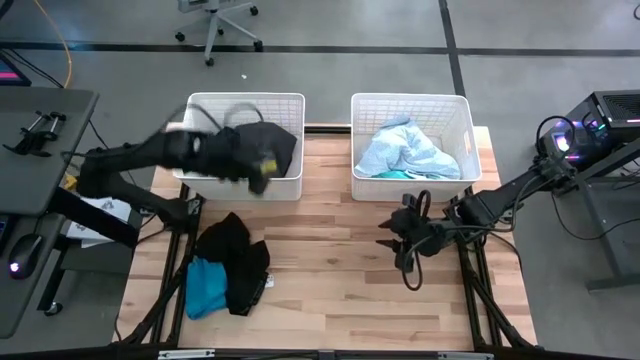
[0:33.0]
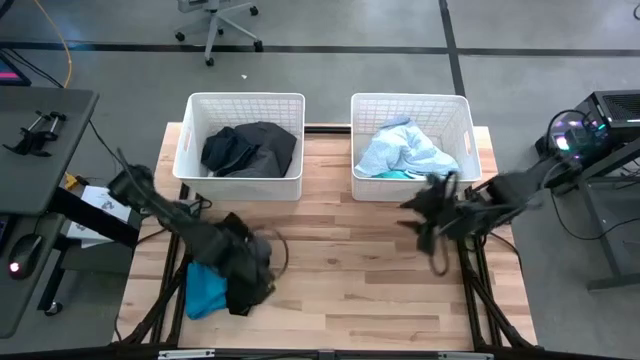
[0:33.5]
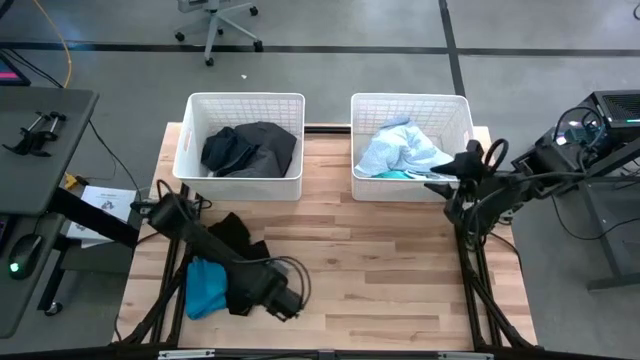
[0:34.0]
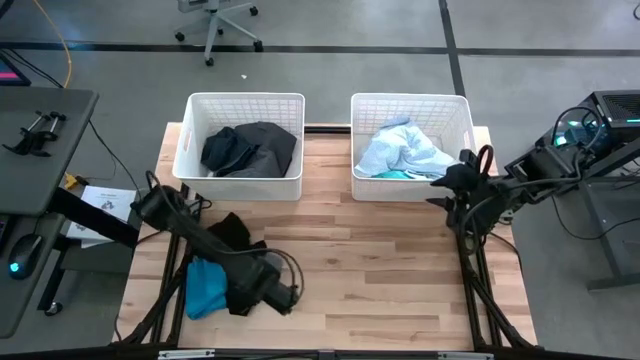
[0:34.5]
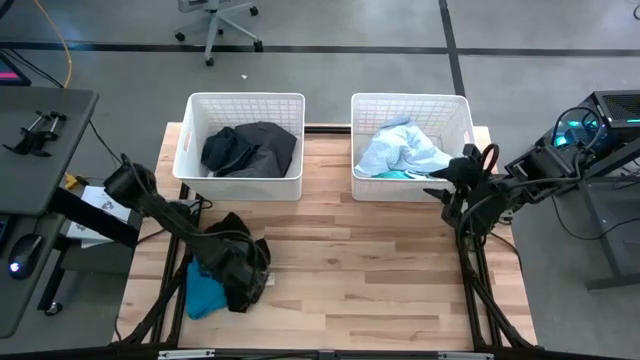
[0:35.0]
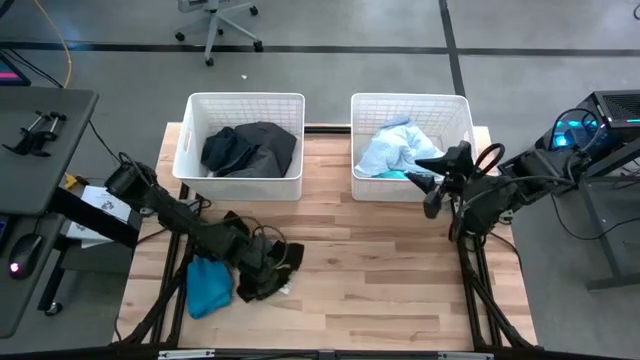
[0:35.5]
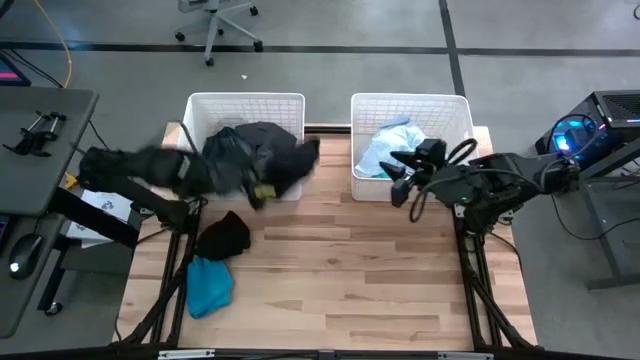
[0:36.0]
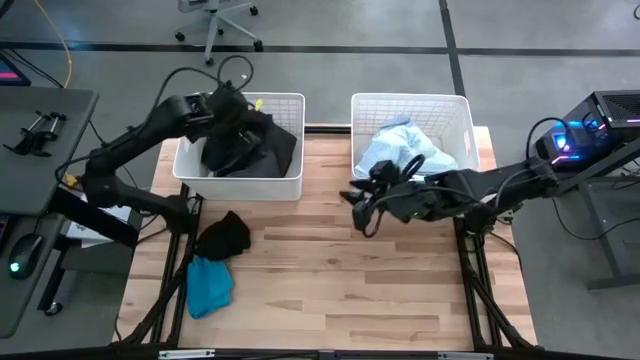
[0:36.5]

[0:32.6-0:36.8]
Task: Sort clothes
Put the bottom black boxer into the left white laundry bin

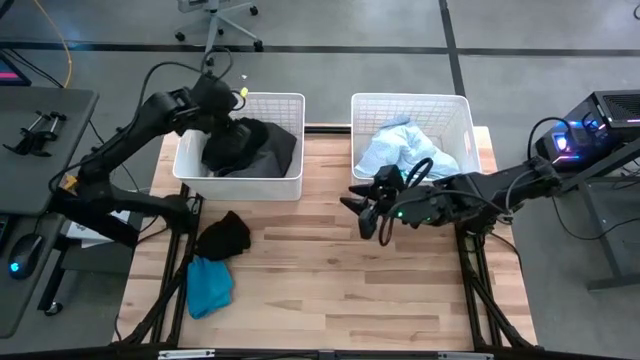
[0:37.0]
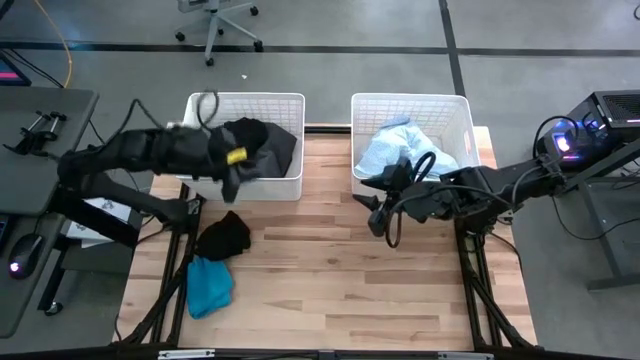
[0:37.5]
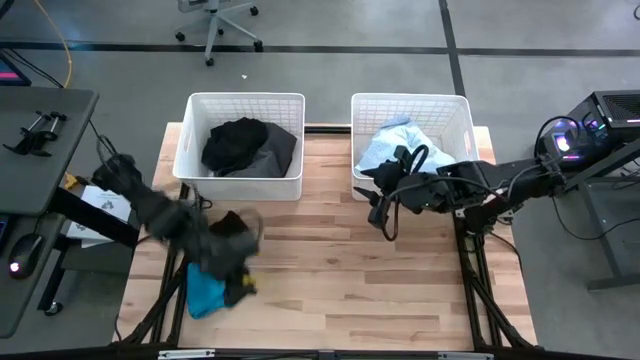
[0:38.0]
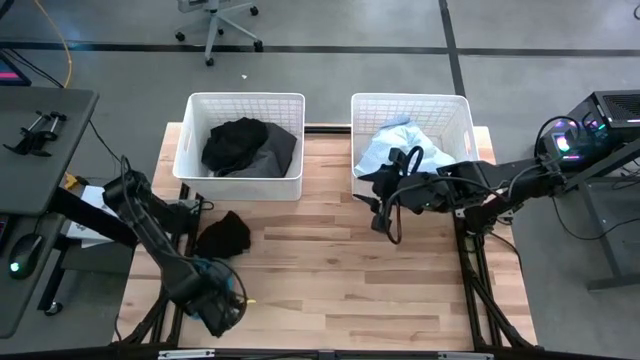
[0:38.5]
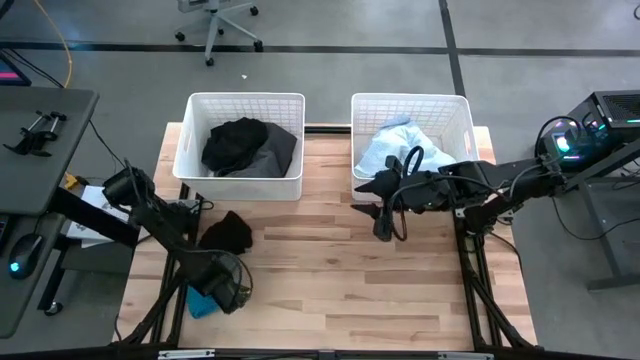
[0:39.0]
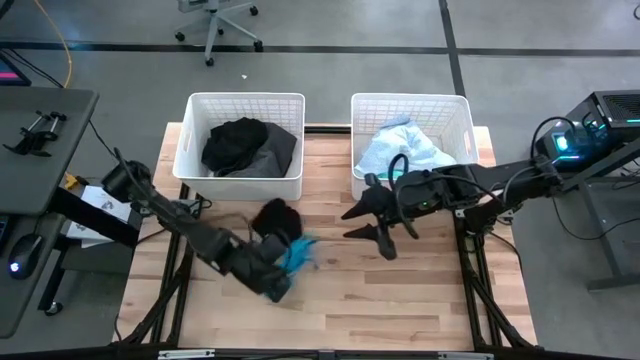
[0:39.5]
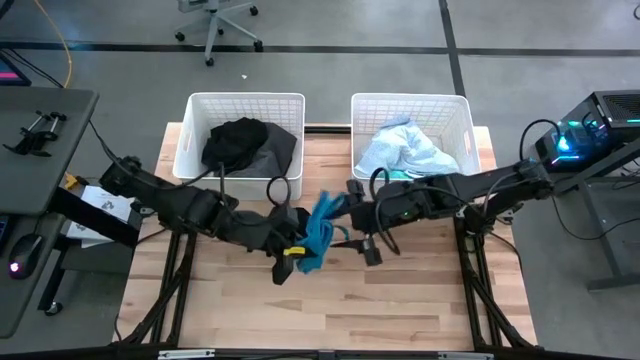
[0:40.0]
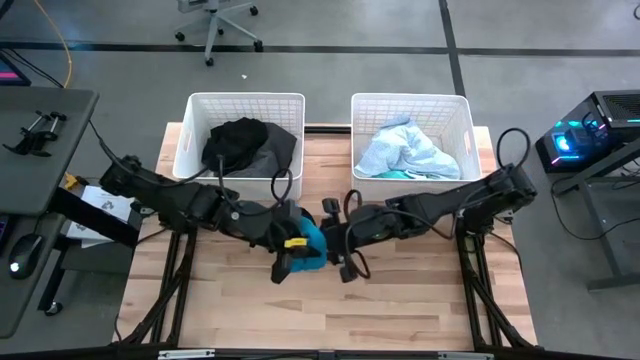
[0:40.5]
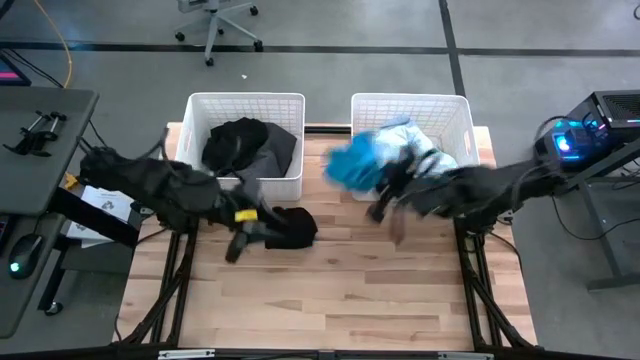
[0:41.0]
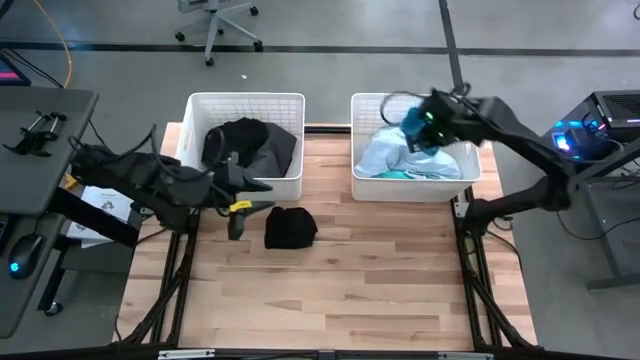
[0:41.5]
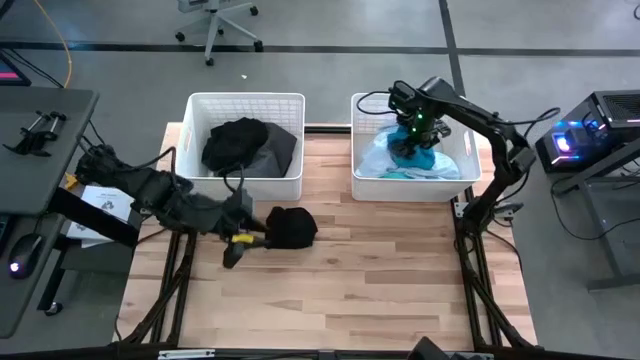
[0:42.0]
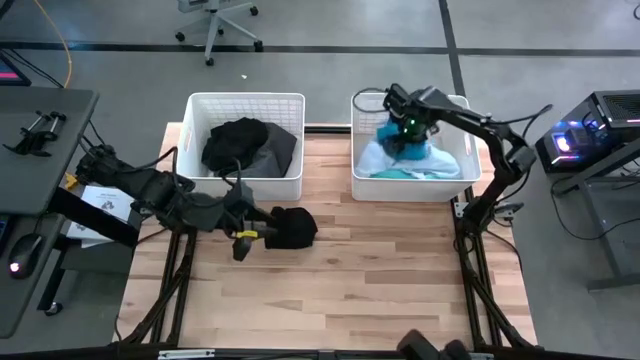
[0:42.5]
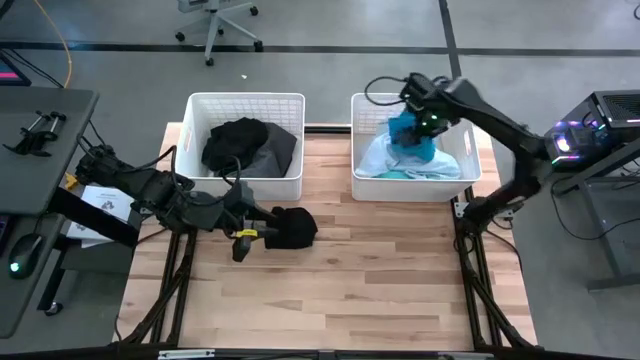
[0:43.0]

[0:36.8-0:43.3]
Put the blue short into the right white laundry bin

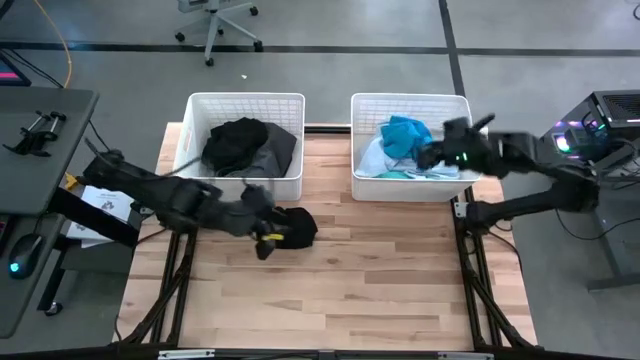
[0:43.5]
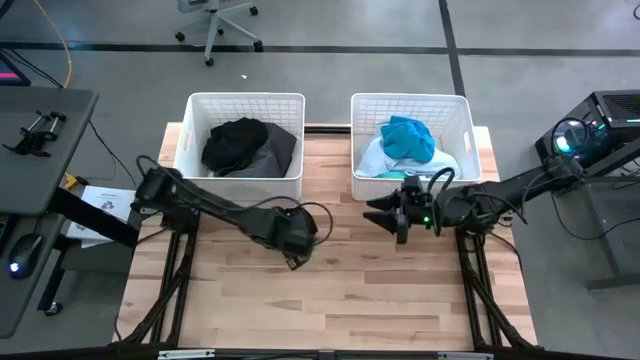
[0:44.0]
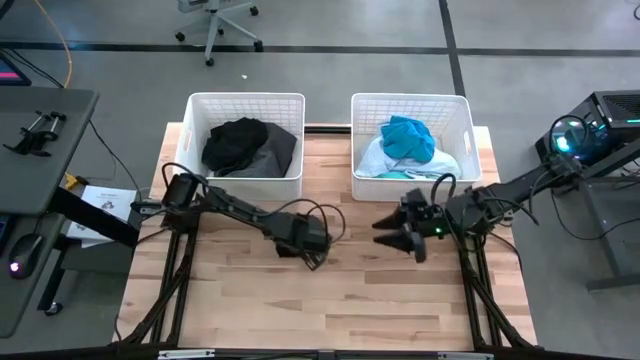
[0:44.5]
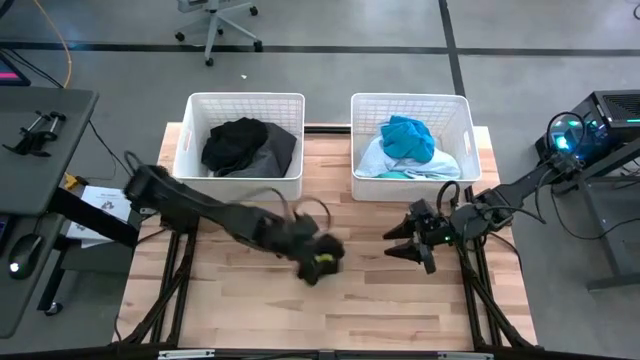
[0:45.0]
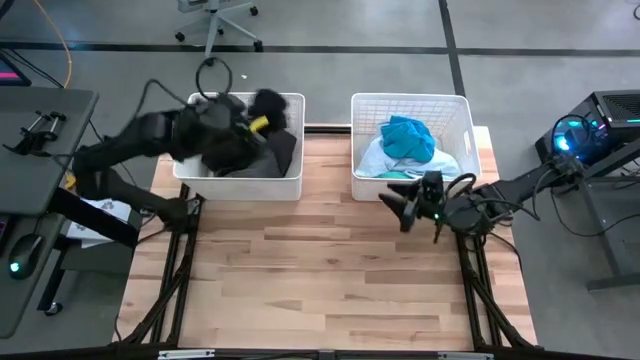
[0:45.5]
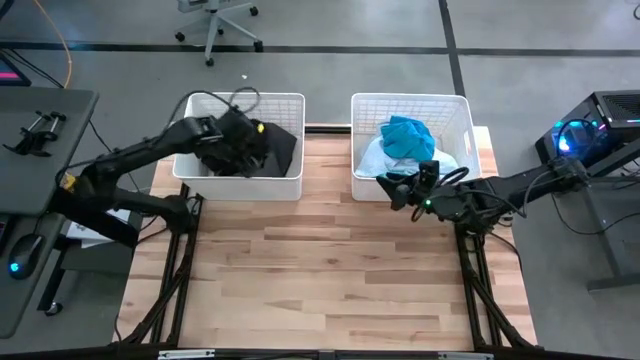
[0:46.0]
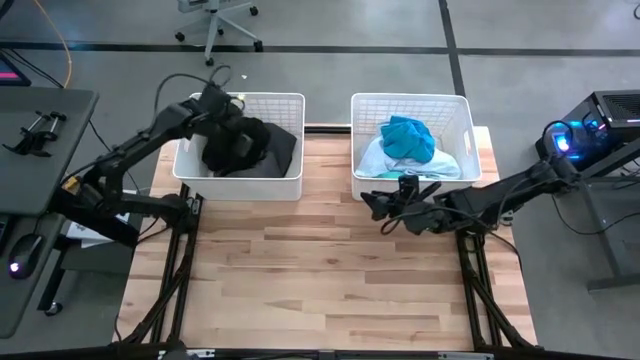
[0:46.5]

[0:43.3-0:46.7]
Put the black boxer into the left white laundry bin

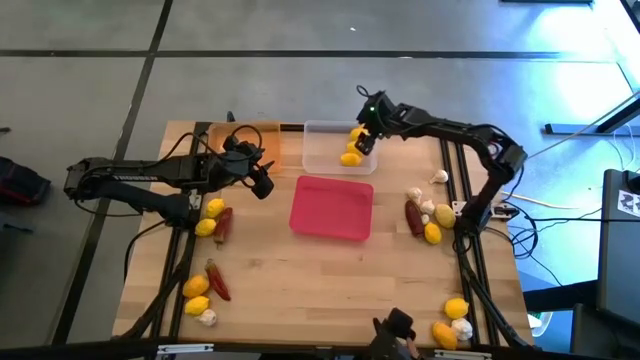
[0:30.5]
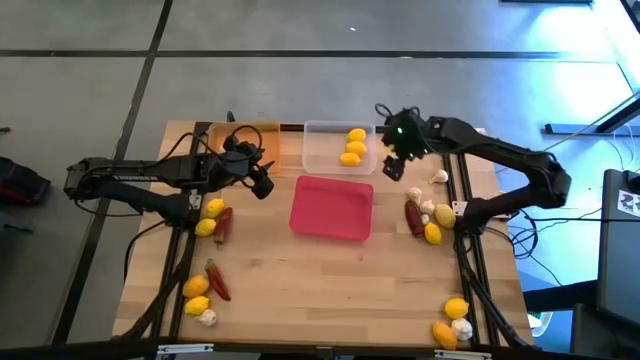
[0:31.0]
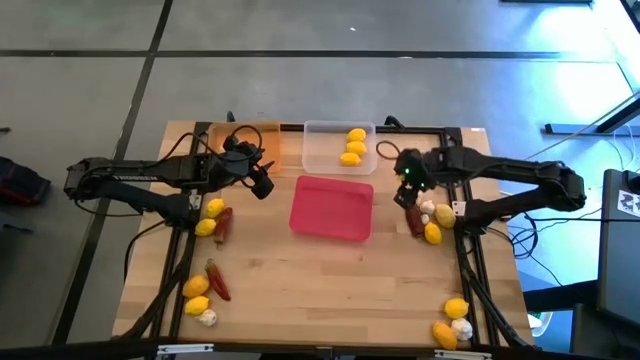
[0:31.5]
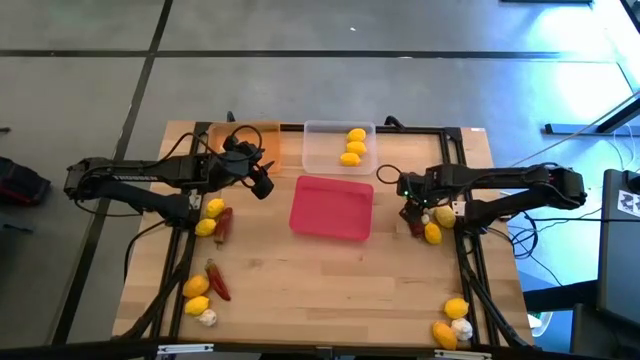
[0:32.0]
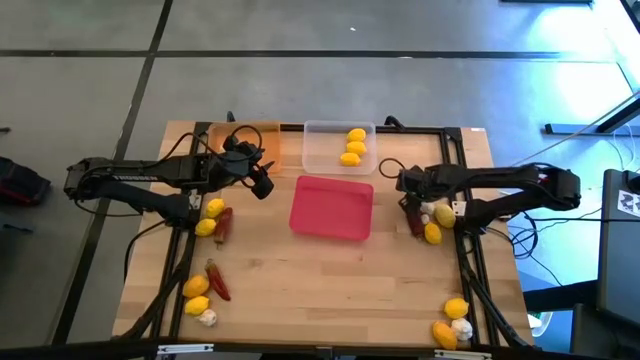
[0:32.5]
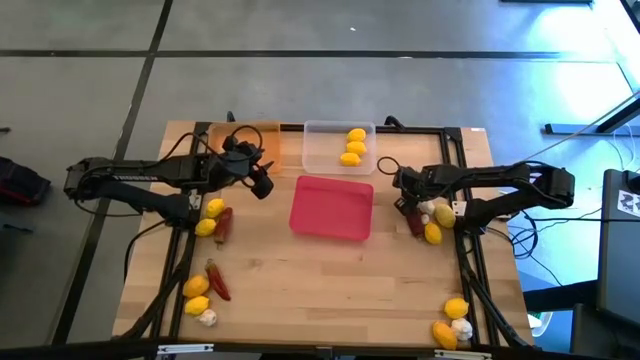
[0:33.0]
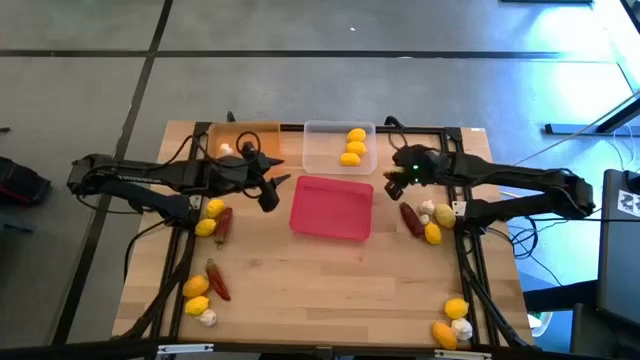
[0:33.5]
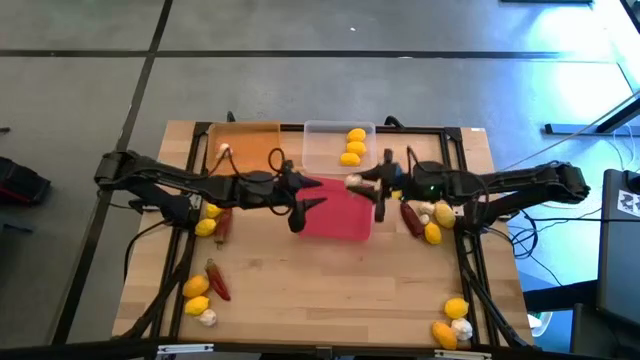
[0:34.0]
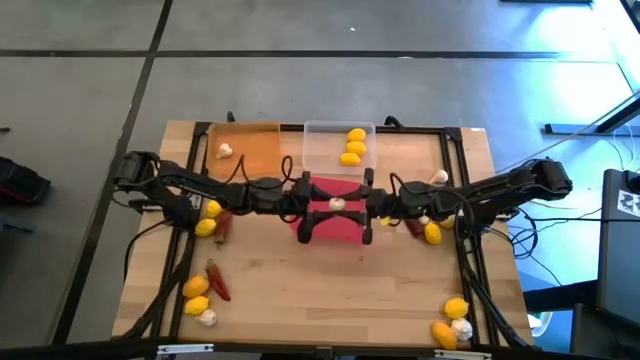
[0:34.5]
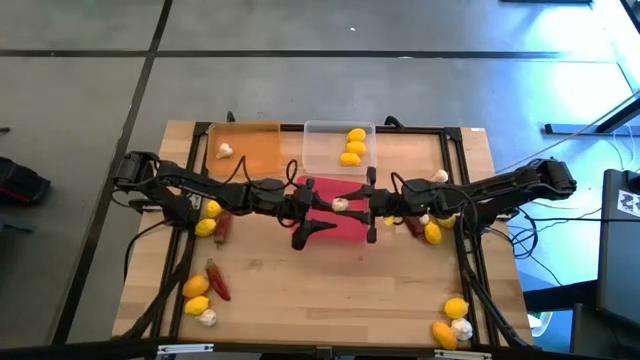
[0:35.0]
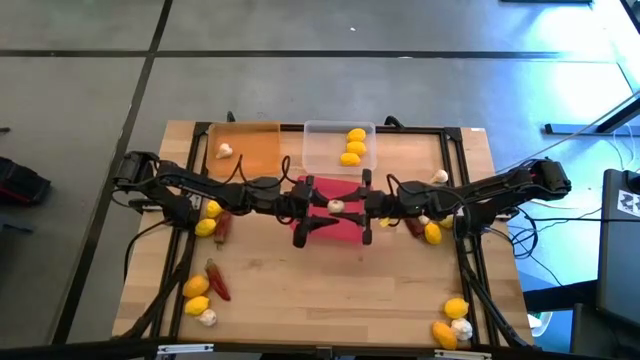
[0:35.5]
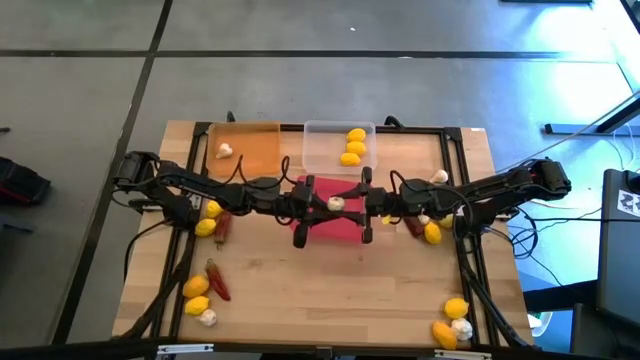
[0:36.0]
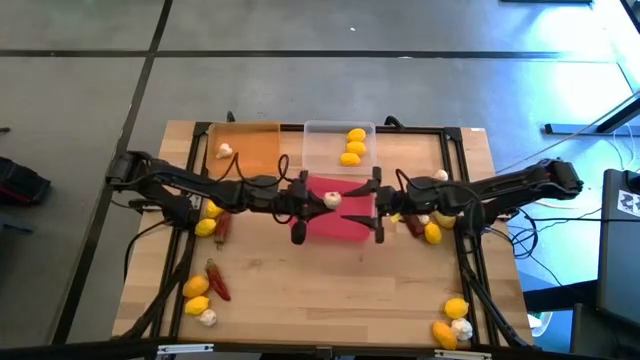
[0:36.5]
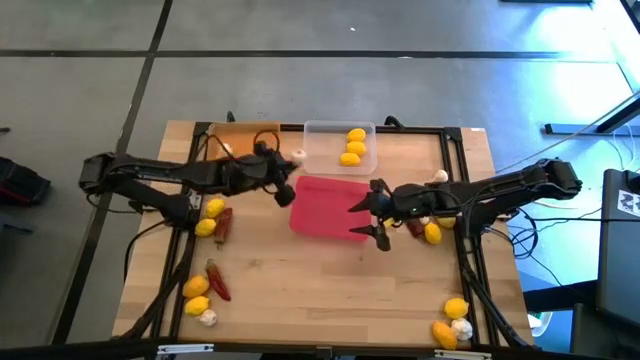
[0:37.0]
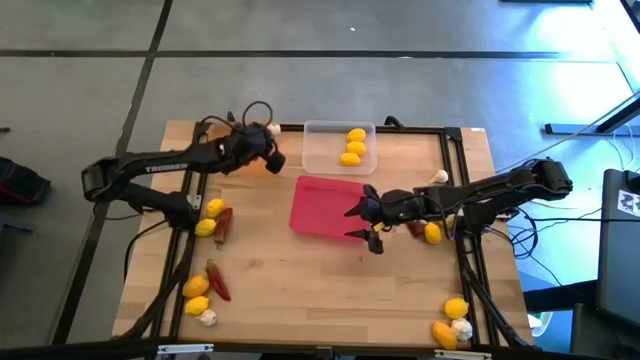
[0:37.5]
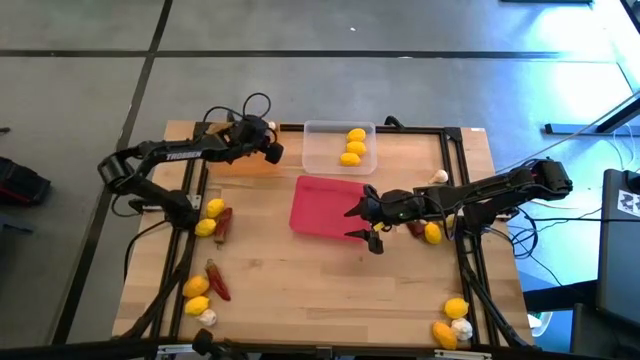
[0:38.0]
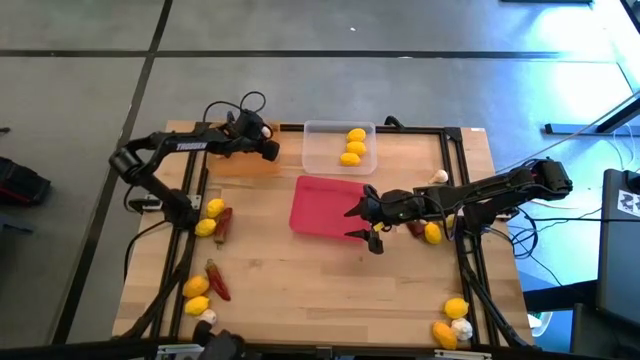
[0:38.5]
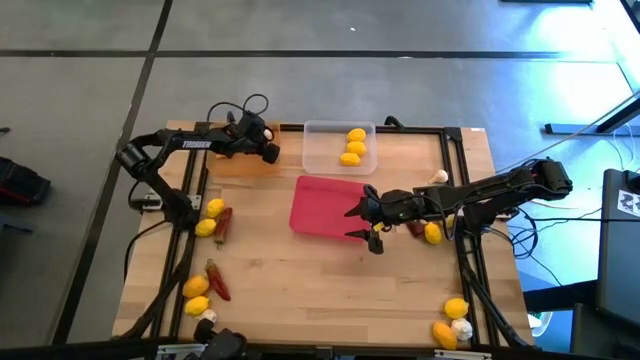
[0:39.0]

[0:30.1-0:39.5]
Task: Sort produce into baskets
Put the white garlic in the orange bin
